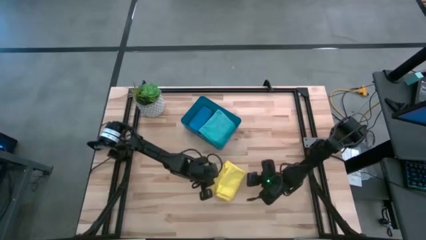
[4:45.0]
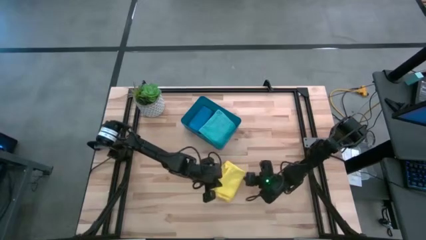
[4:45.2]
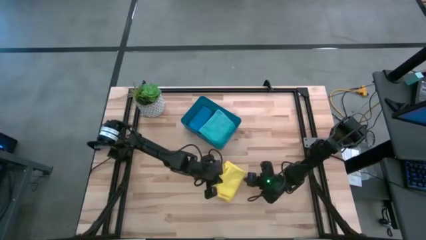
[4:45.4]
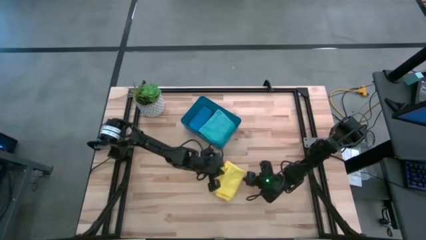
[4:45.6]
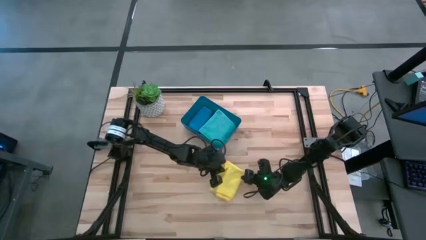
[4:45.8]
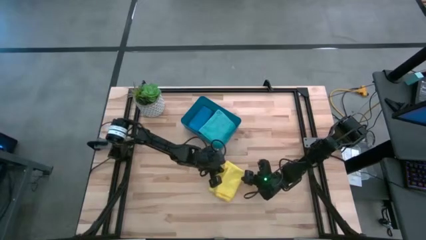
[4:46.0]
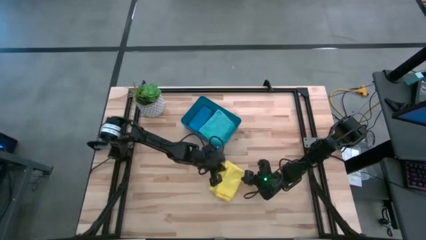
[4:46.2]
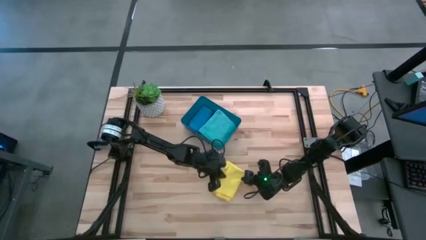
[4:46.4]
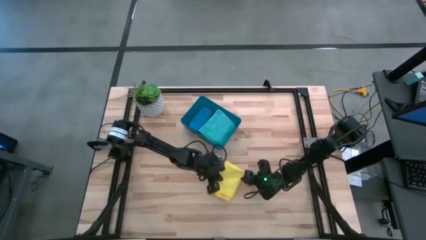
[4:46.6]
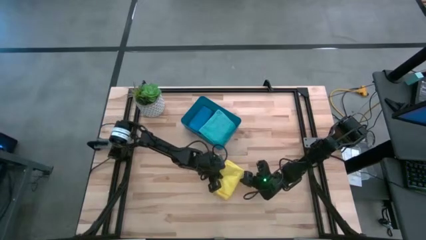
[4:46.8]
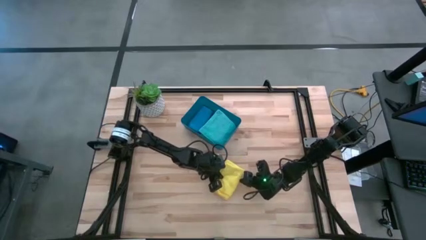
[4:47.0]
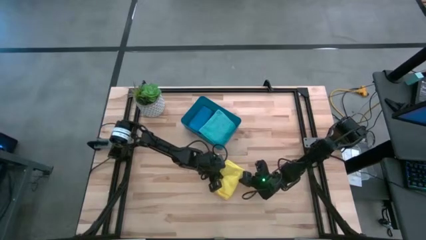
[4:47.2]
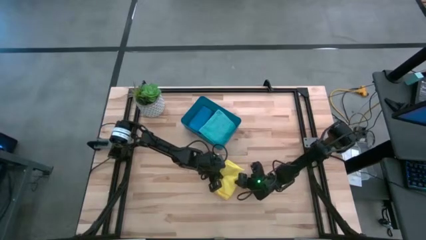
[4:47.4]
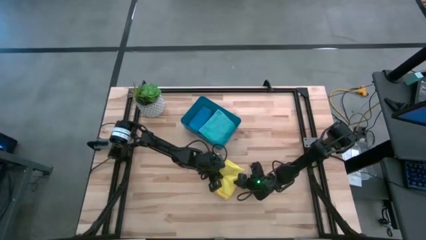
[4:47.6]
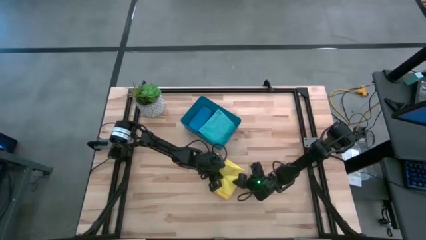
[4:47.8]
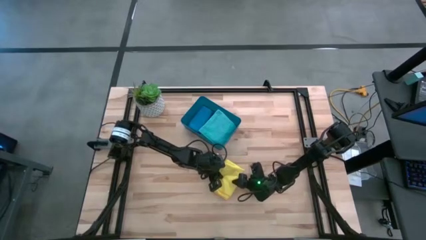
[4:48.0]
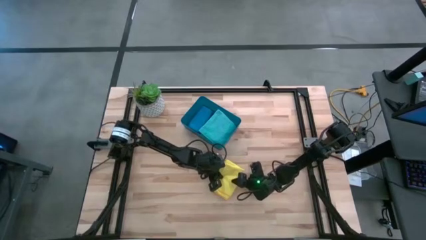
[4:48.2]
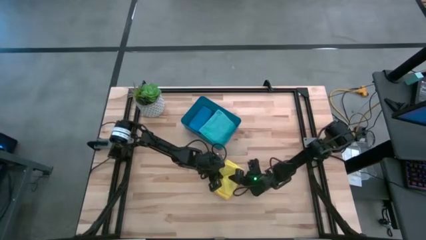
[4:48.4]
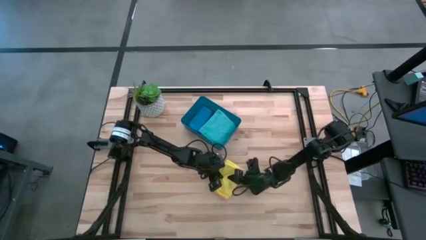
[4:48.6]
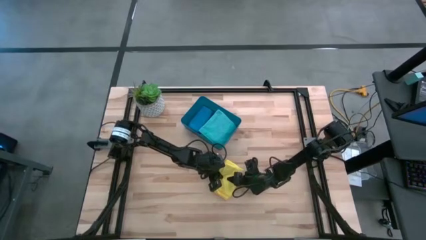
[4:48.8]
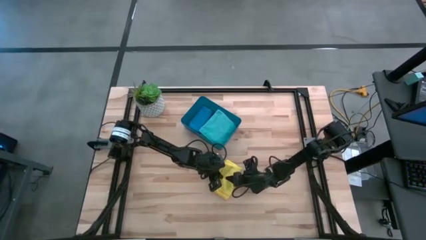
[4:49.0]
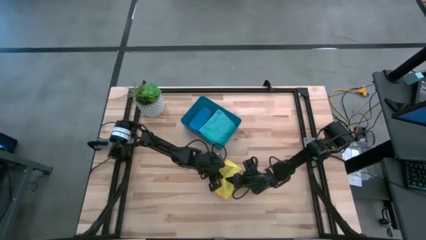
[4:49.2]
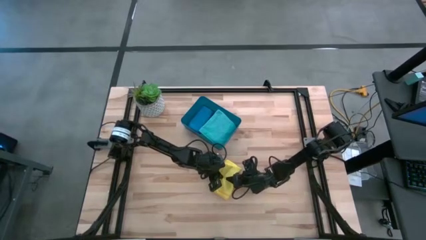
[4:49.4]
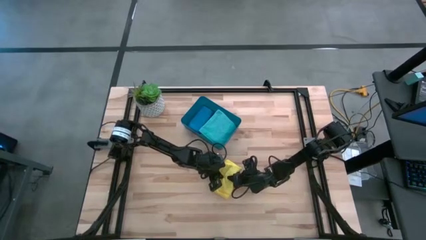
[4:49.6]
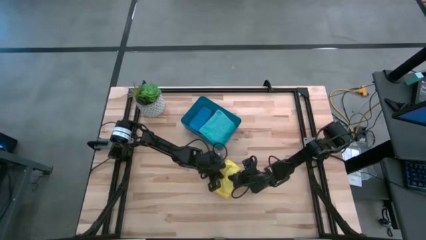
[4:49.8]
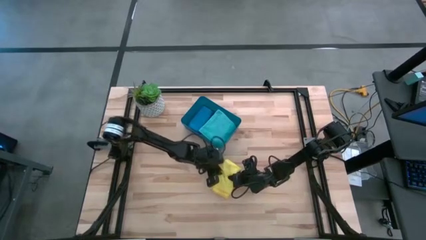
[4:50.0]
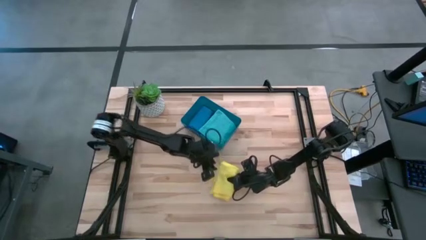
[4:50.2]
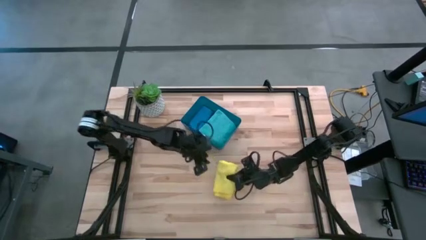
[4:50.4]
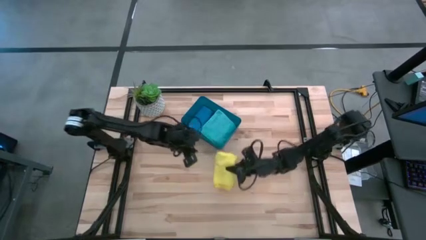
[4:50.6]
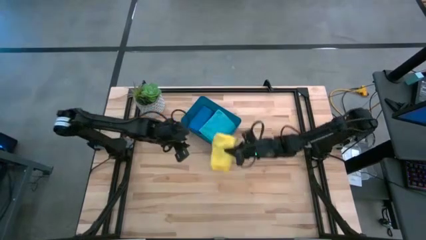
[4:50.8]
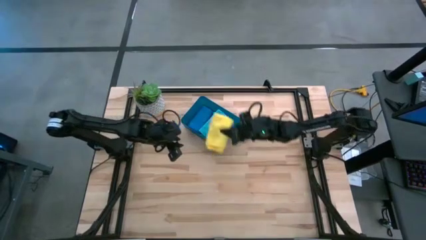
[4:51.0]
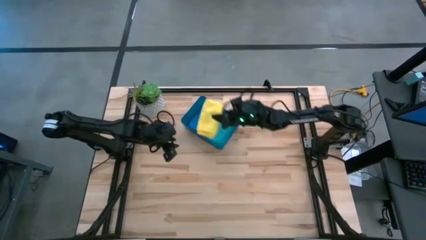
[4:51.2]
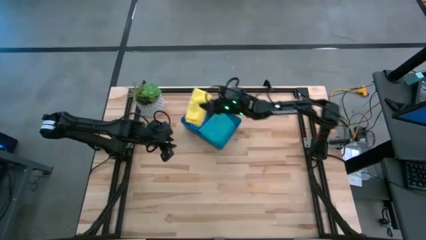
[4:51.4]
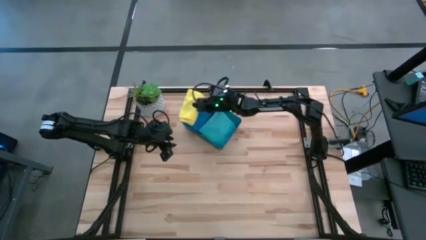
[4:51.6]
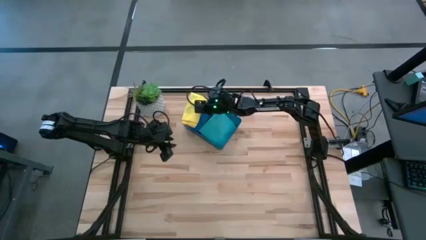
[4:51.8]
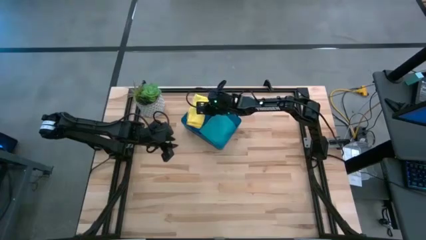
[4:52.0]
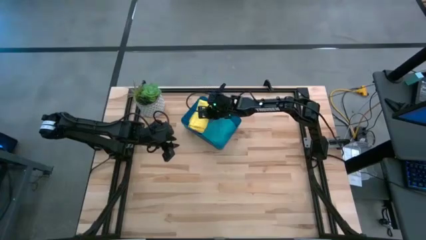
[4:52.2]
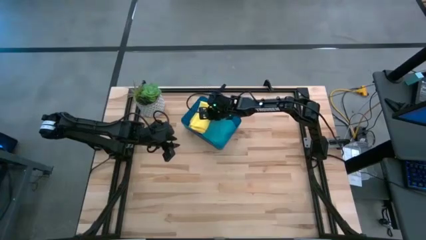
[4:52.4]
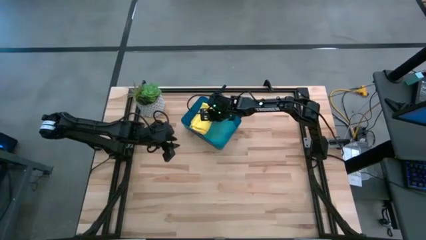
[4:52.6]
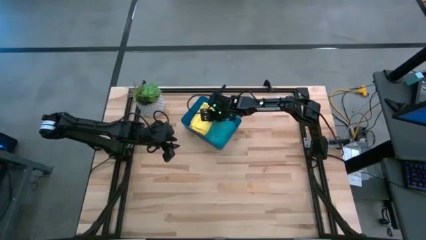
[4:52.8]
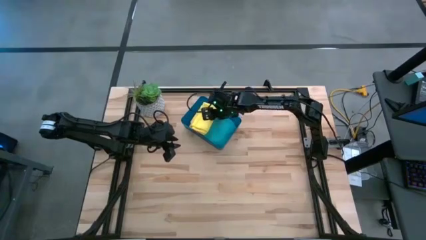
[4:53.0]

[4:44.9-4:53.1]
Task: Fold microfiber towels
Put the yellow microfiber cloth into the blue bin

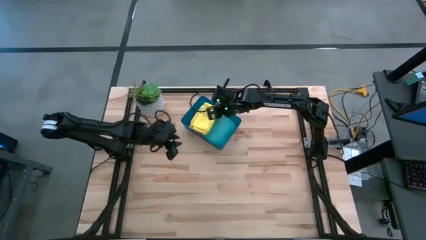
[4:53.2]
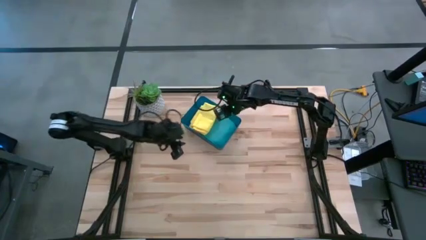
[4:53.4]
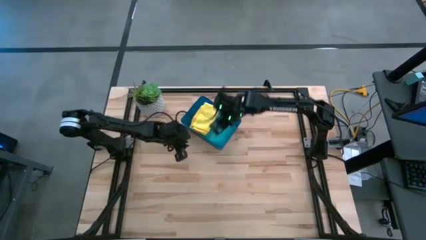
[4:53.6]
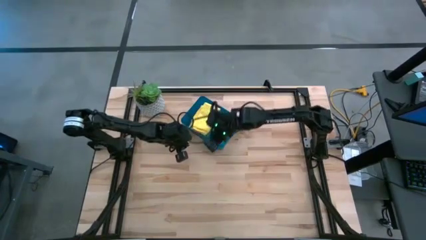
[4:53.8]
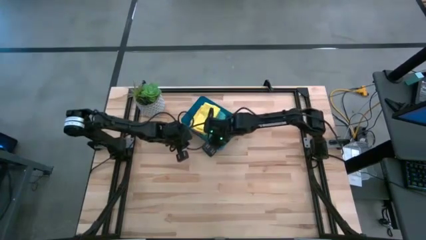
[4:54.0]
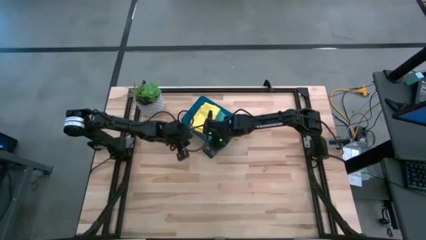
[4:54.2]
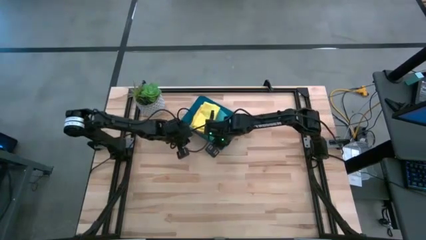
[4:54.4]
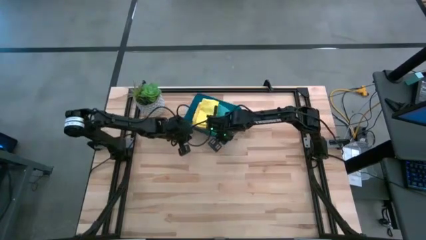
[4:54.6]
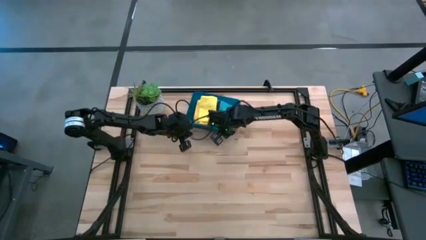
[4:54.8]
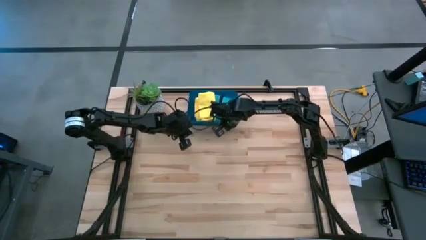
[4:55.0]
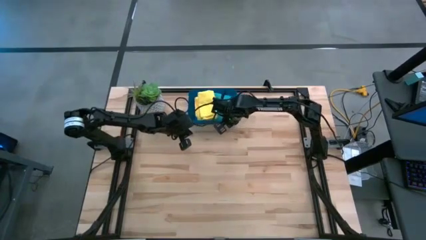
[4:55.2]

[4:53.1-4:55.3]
Adjust the blue bin

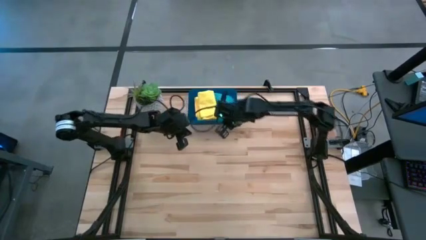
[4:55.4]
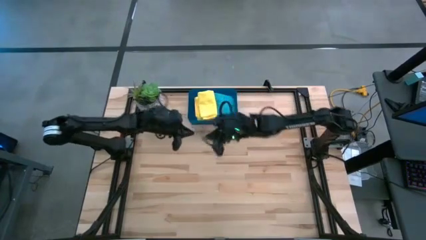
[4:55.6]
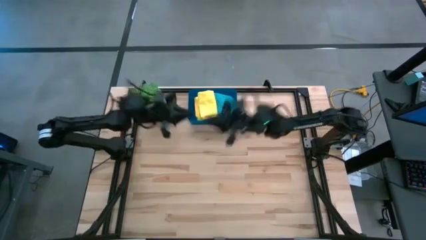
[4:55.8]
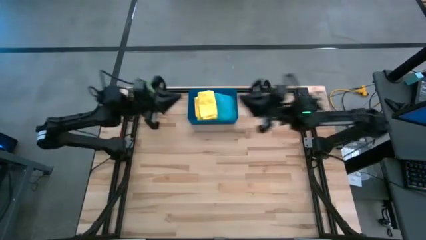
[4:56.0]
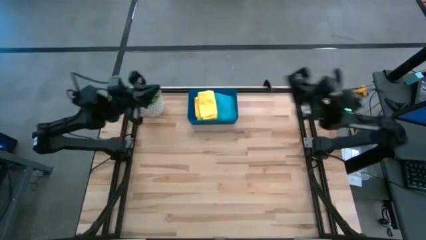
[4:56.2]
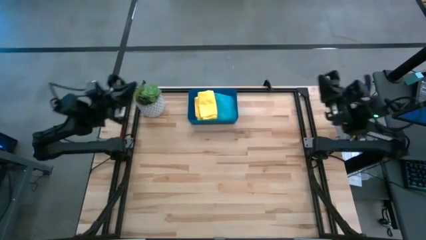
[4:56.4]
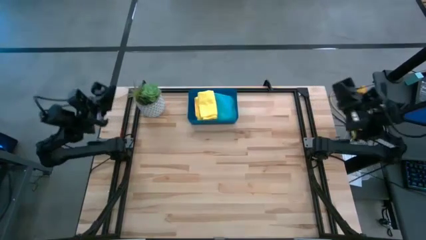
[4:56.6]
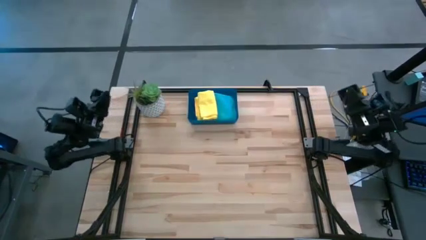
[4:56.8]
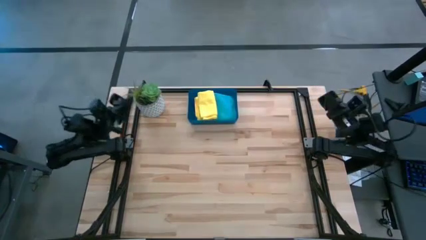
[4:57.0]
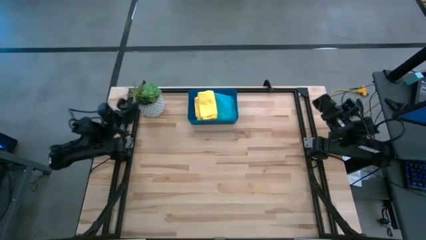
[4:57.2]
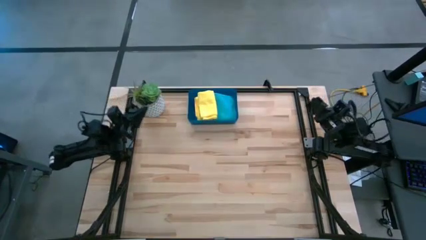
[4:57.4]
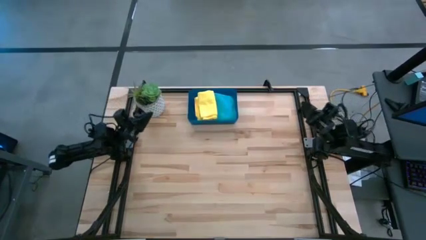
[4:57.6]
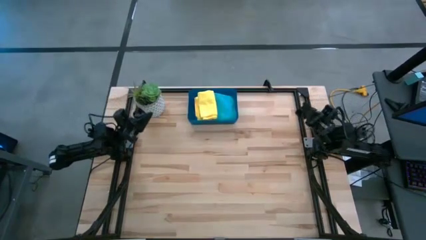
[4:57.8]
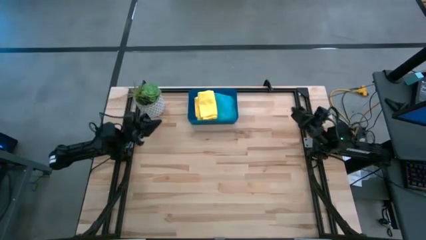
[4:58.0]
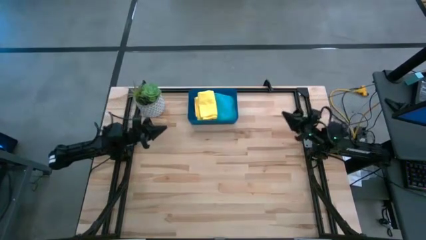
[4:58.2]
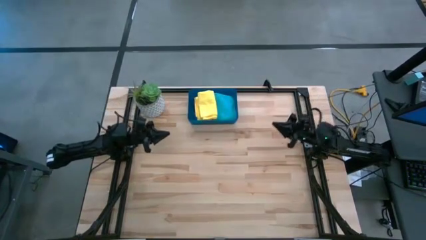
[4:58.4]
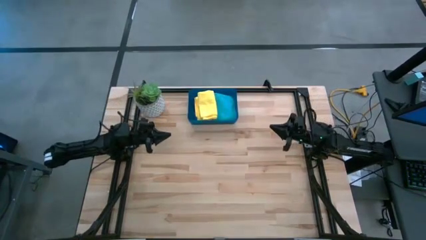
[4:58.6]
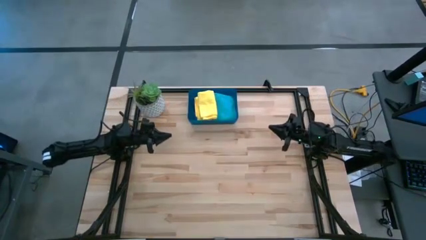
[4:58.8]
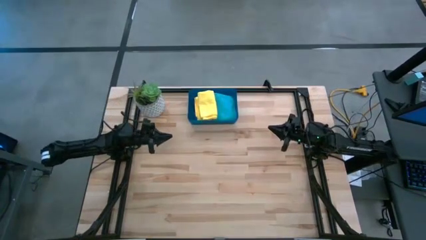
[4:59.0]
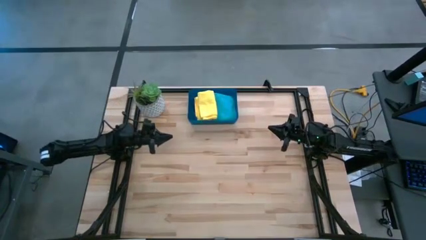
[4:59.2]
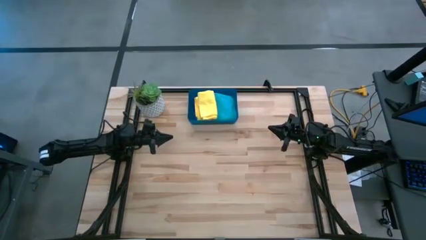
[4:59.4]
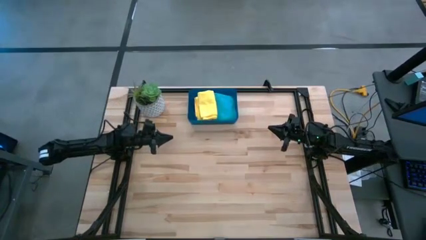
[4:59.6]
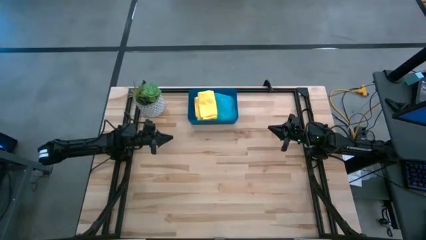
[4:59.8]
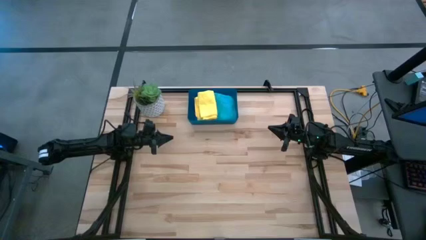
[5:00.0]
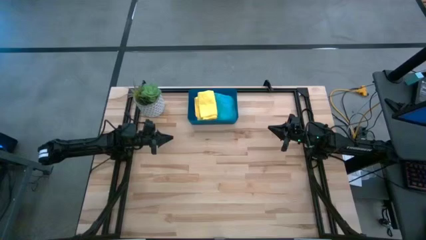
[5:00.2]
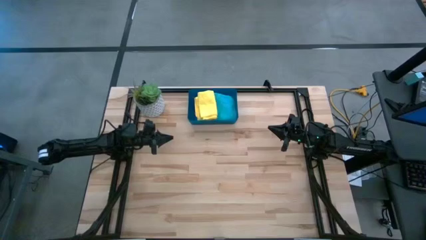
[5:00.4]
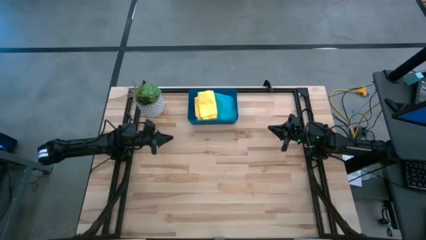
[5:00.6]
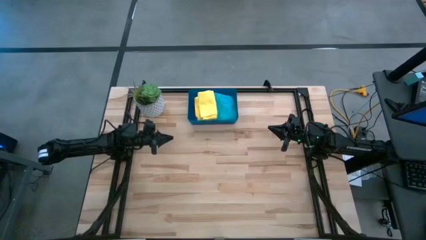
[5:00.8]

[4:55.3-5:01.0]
Return to Home Position
